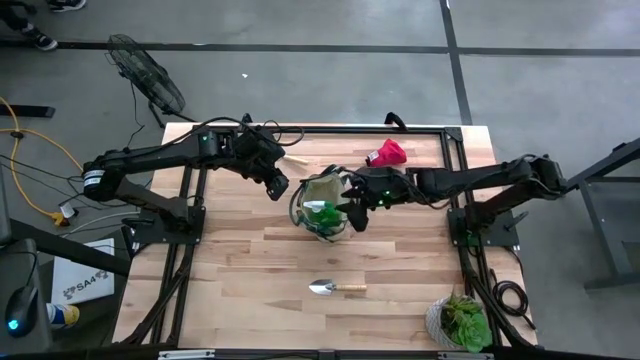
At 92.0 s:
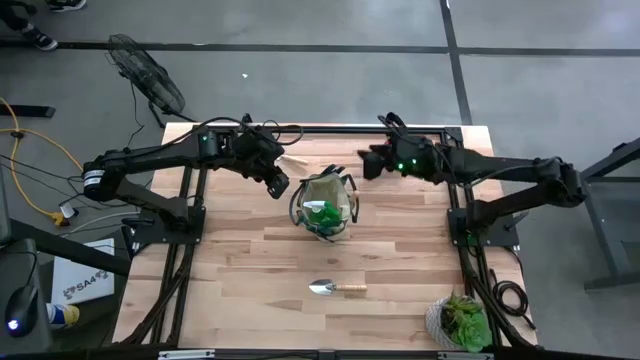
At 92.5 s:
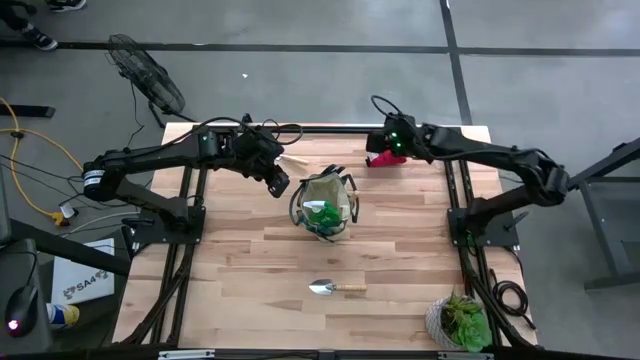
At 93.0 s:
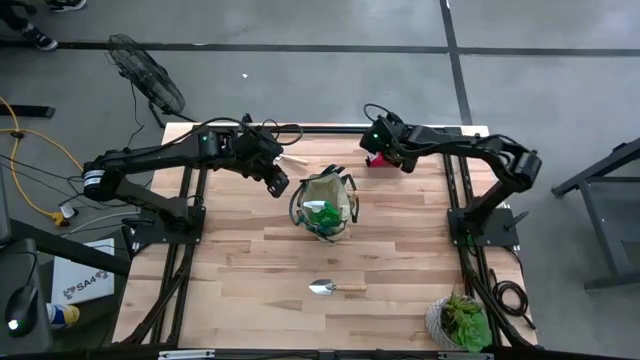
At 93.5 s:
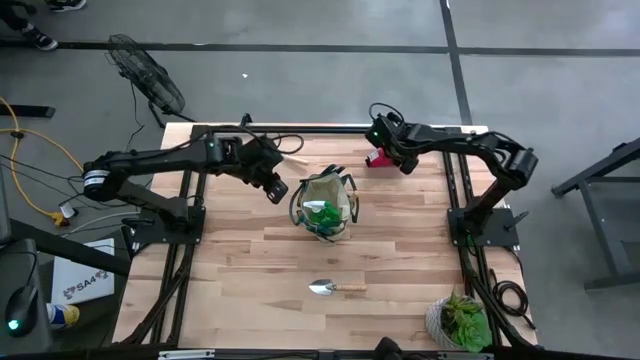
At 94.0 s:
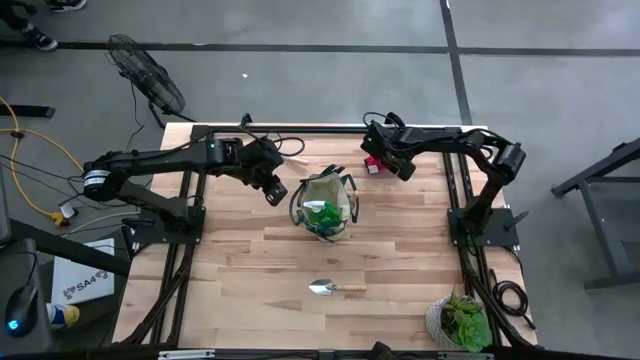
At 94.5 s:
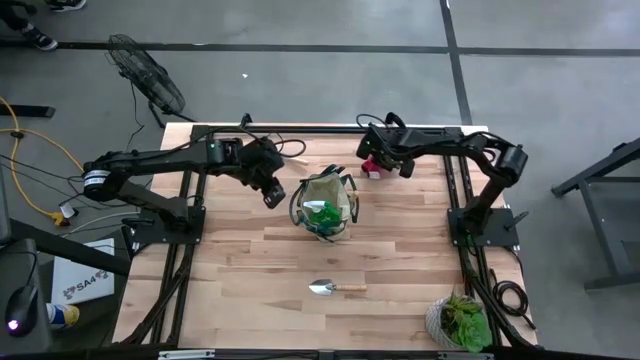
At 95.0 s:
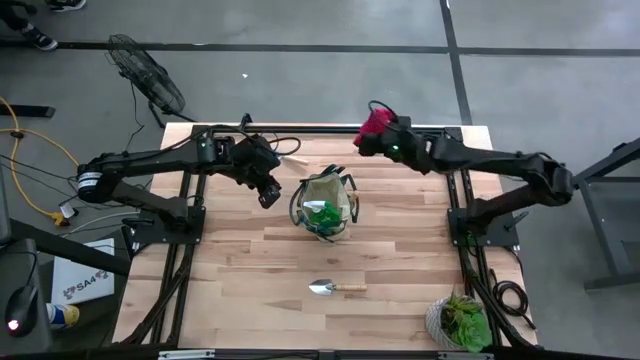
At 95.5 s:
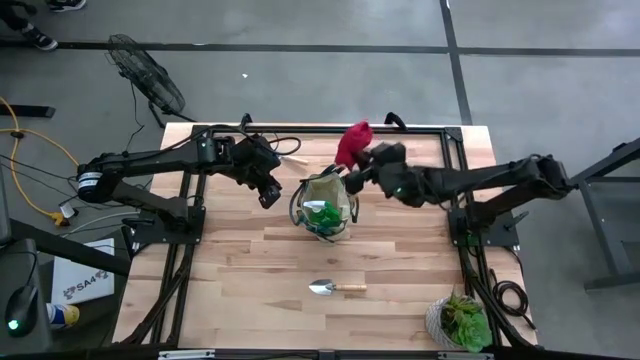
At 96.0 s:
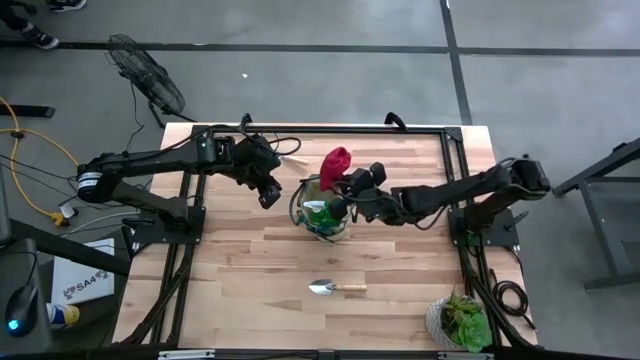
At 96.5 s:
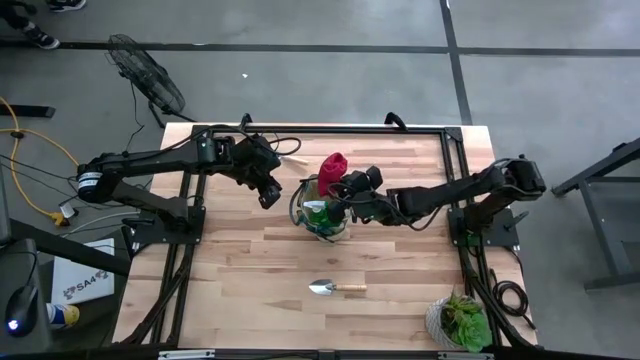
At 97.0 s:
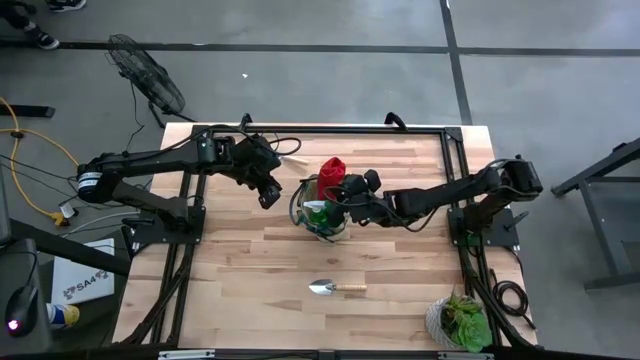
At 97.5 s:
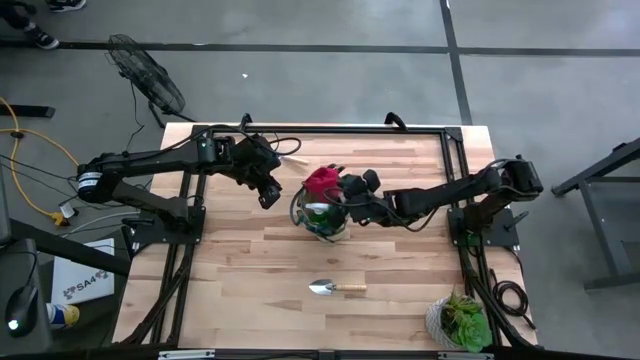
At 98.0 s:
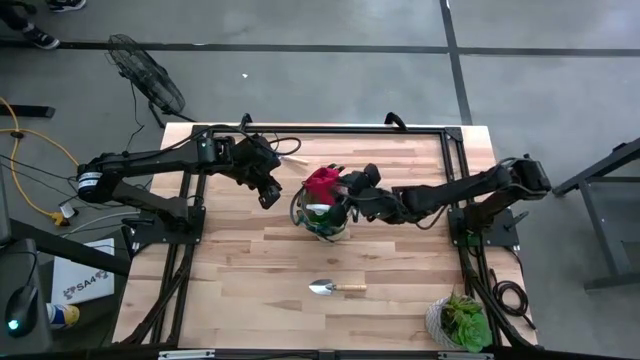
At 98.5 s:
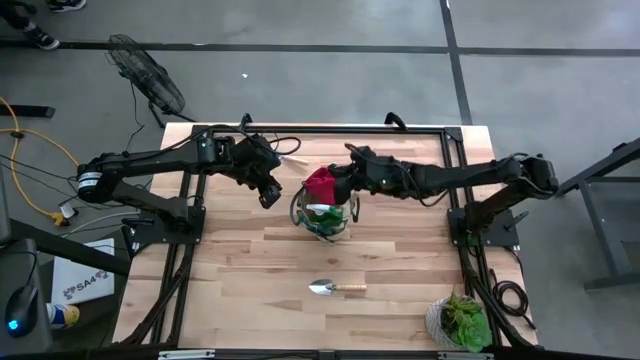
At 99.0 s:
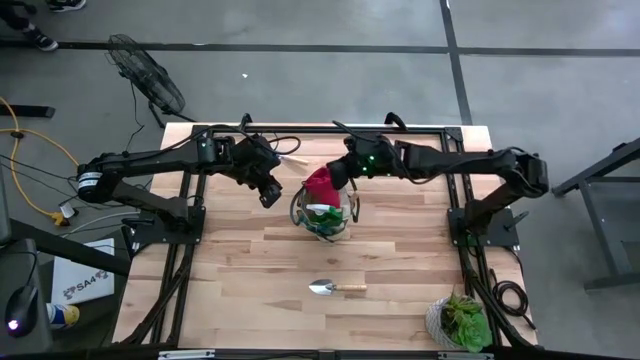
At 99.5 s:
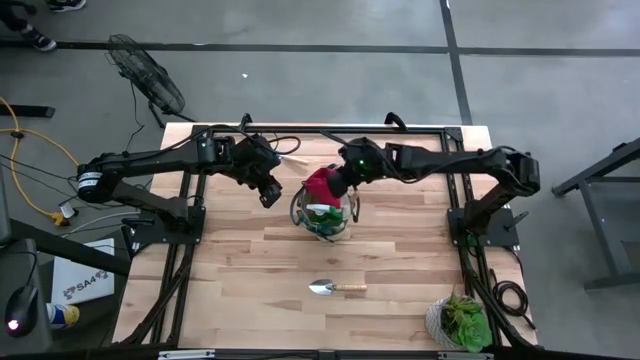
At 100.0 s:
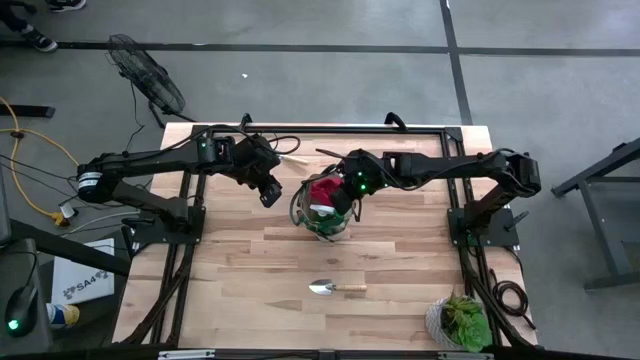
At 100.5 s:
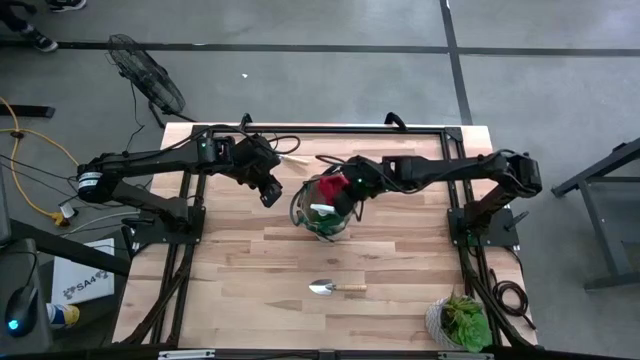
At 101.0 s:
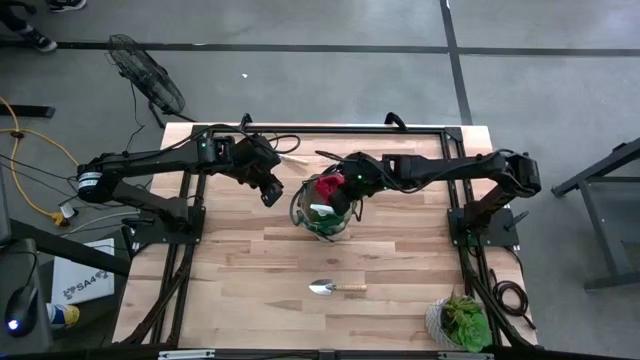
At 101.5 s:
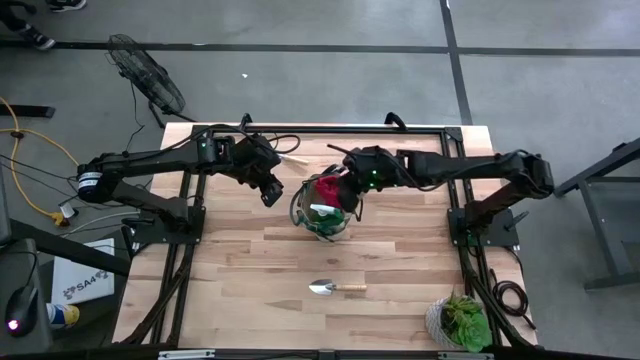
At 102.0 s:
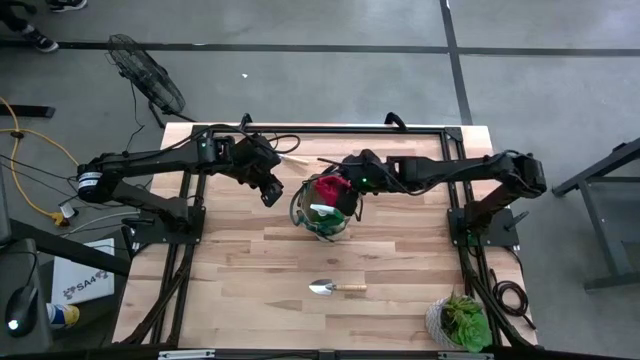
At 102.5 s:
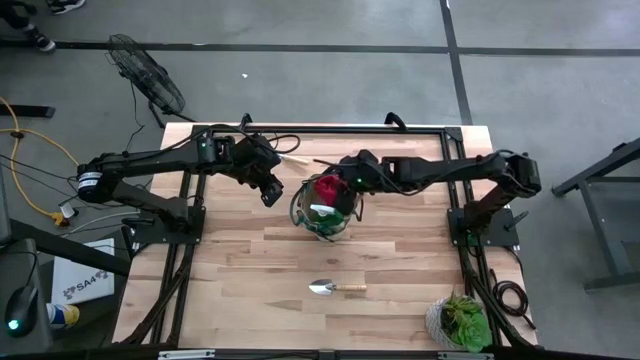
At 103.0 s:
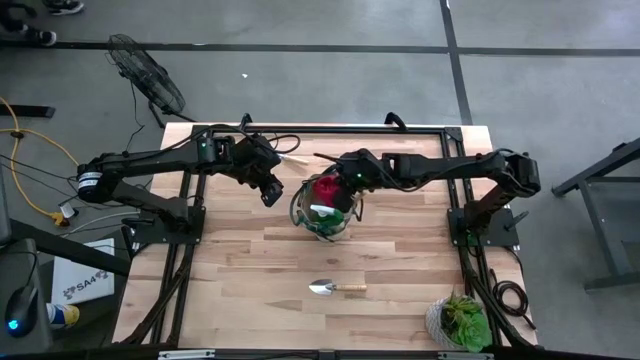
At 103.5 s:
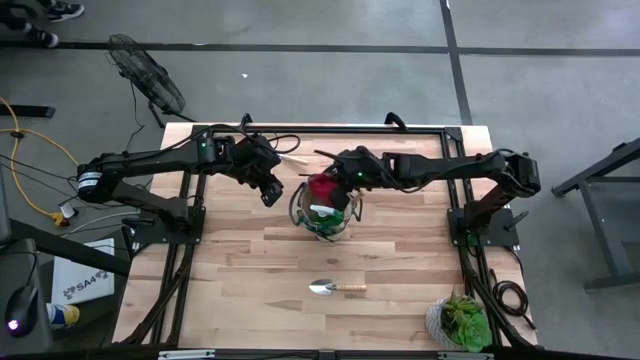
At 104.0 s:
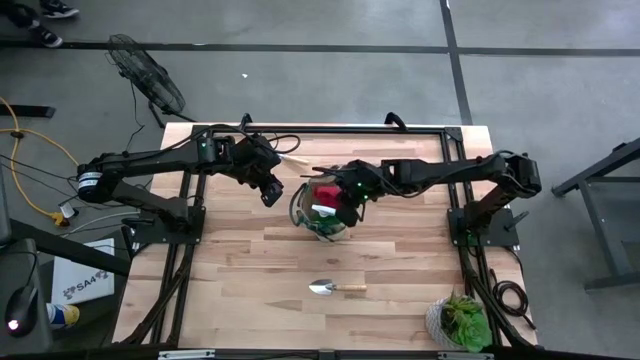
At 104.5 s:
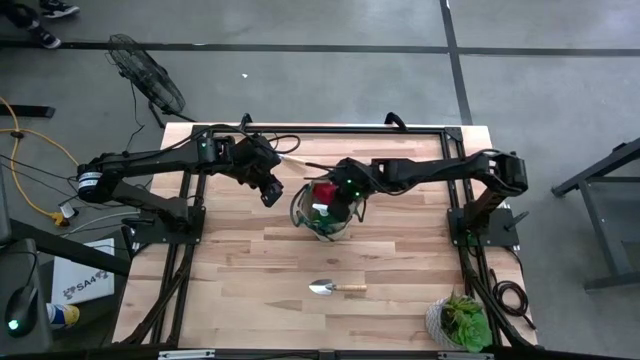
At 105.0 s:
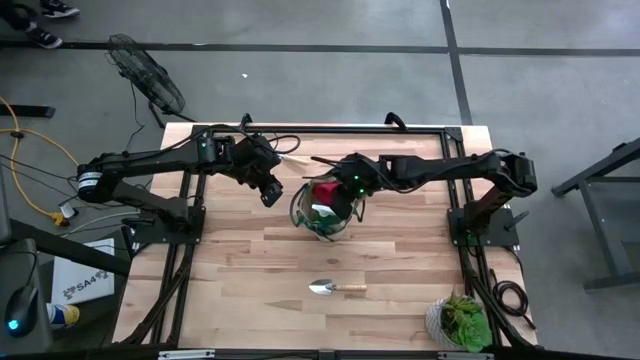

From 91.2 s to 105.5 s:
Task: Pick & Place Garden tools in Gardening bag
Put the red glove into the gardening bag
